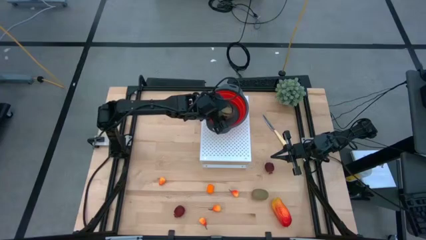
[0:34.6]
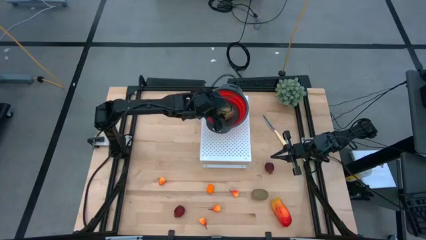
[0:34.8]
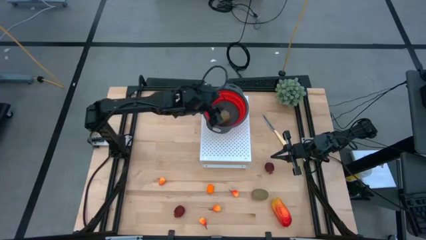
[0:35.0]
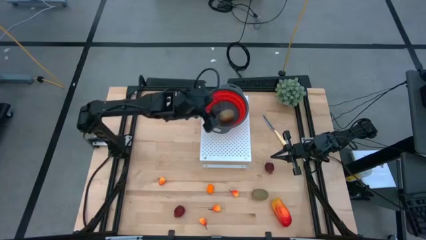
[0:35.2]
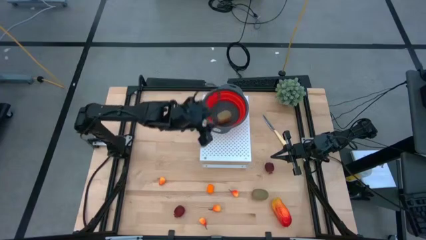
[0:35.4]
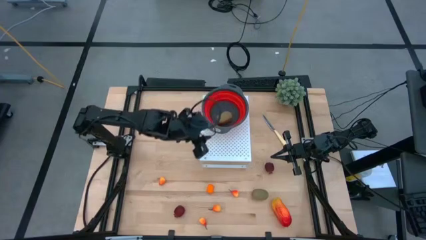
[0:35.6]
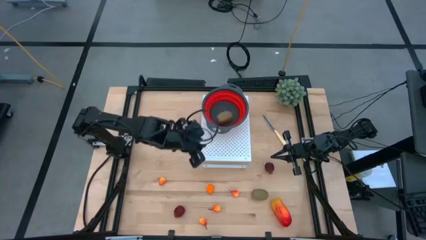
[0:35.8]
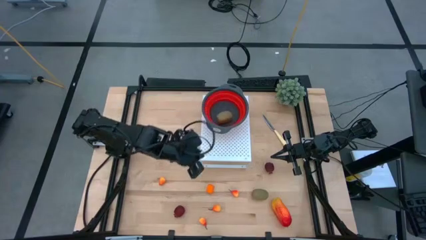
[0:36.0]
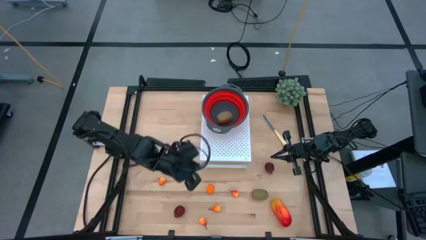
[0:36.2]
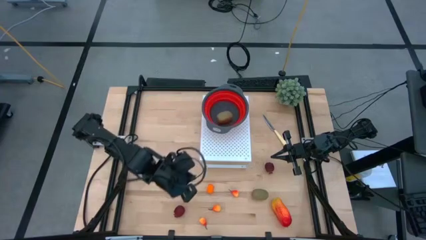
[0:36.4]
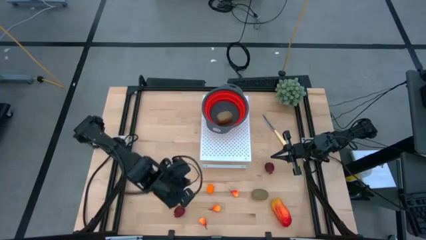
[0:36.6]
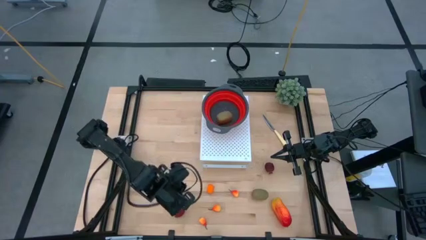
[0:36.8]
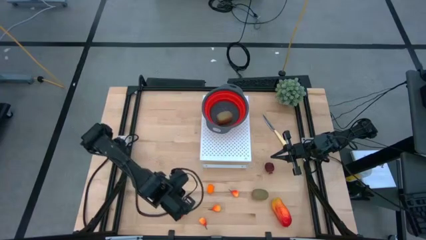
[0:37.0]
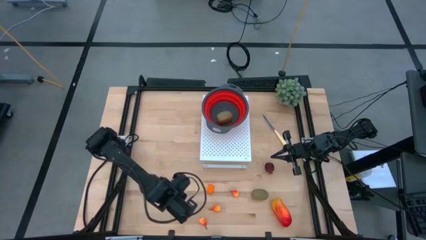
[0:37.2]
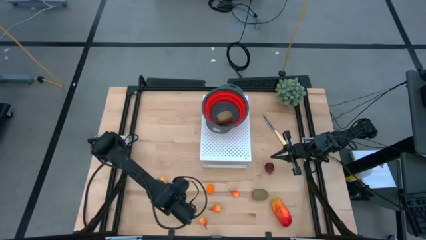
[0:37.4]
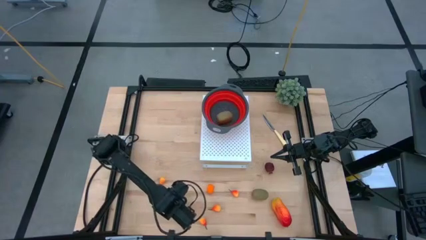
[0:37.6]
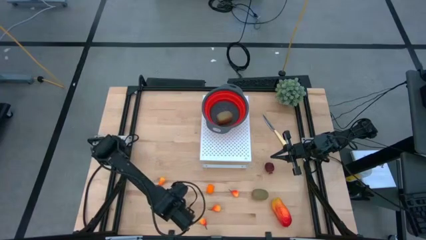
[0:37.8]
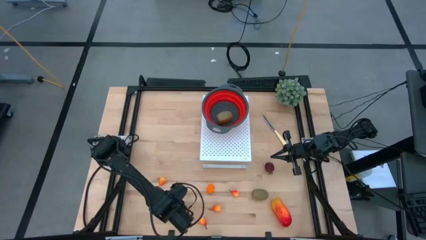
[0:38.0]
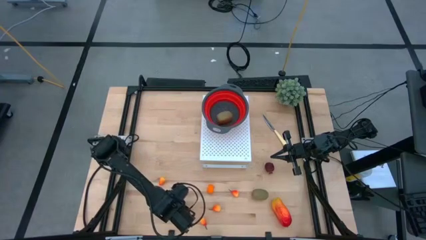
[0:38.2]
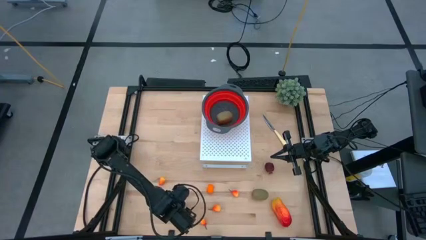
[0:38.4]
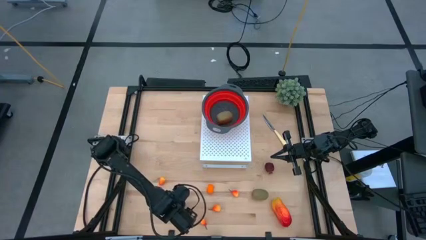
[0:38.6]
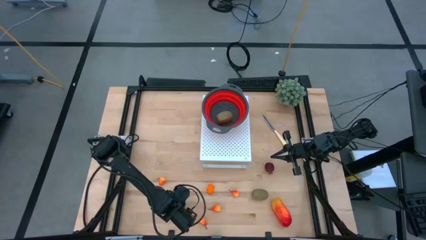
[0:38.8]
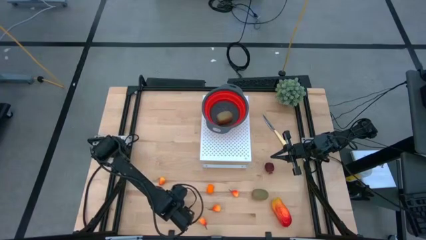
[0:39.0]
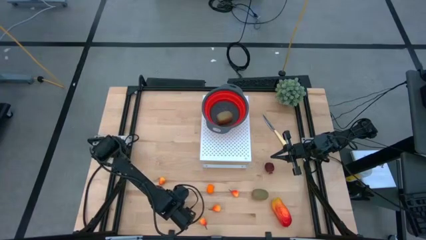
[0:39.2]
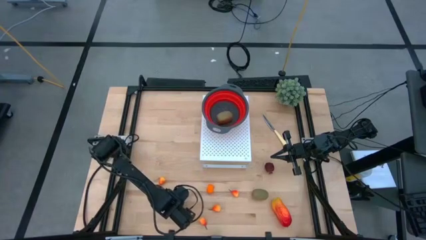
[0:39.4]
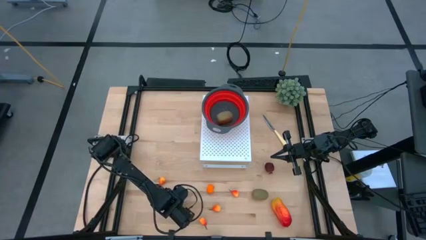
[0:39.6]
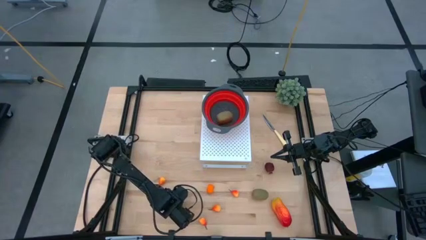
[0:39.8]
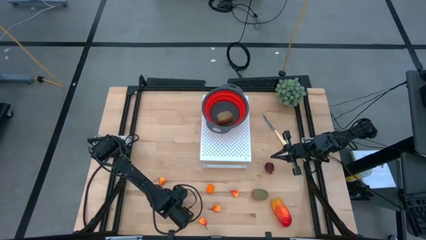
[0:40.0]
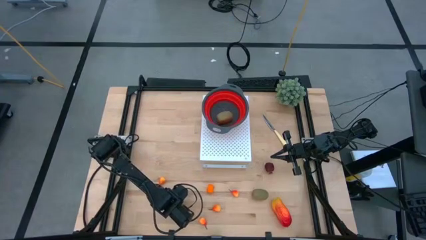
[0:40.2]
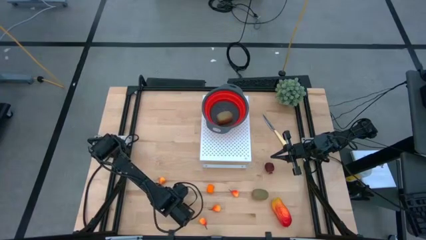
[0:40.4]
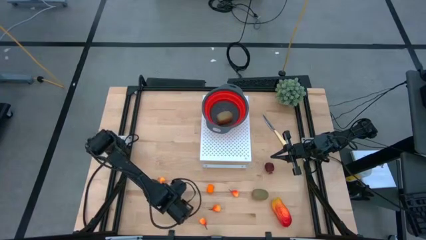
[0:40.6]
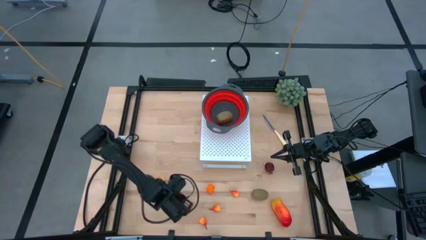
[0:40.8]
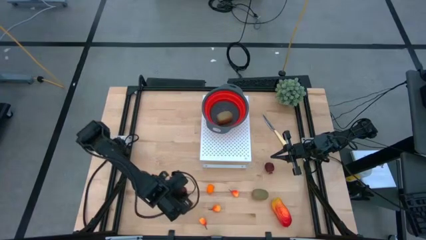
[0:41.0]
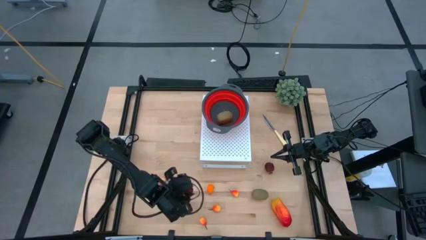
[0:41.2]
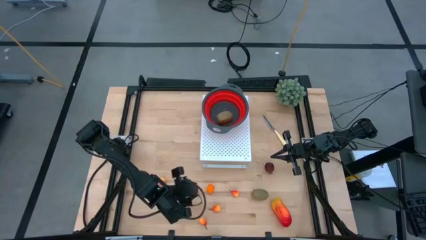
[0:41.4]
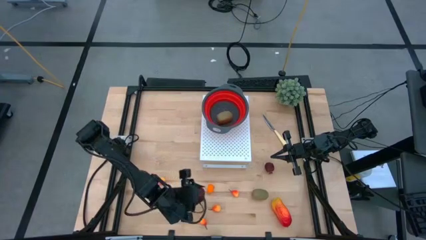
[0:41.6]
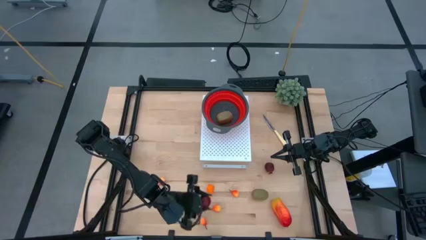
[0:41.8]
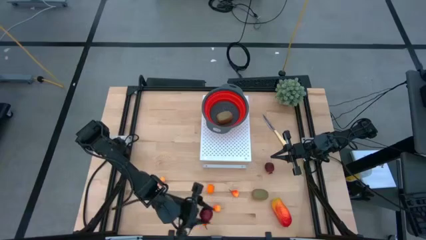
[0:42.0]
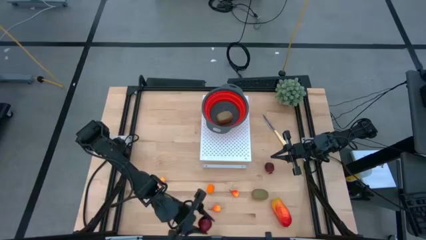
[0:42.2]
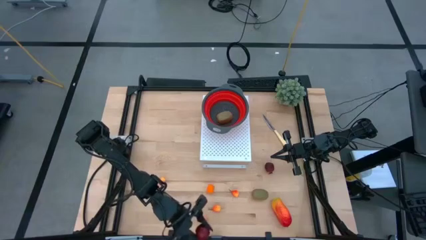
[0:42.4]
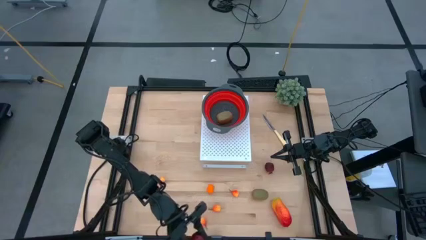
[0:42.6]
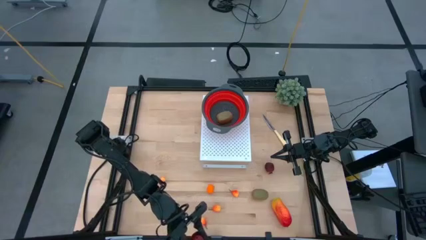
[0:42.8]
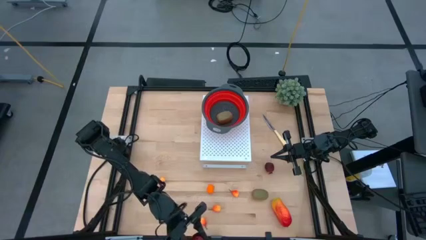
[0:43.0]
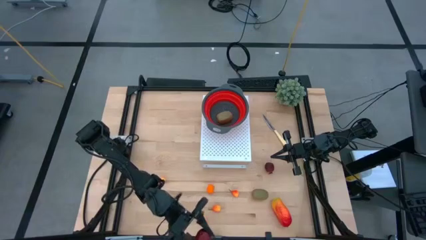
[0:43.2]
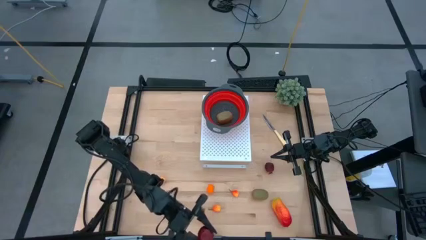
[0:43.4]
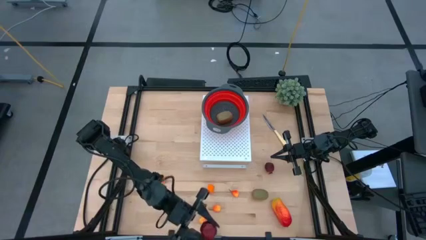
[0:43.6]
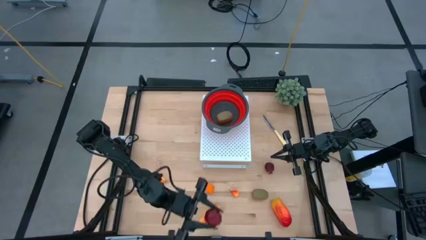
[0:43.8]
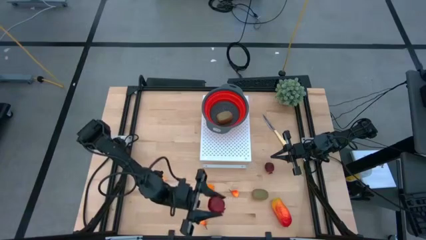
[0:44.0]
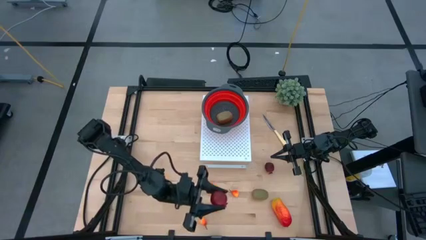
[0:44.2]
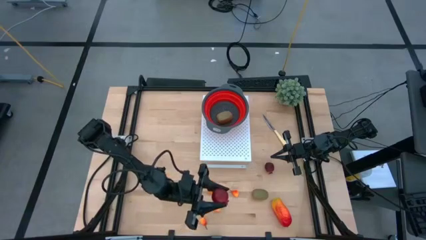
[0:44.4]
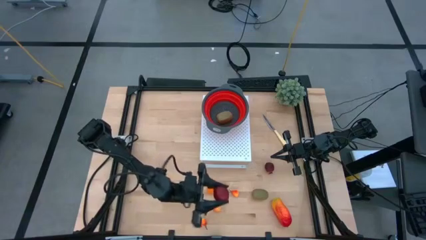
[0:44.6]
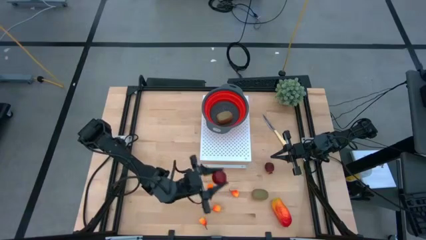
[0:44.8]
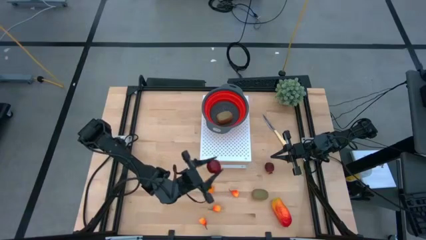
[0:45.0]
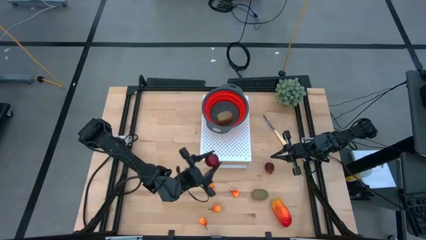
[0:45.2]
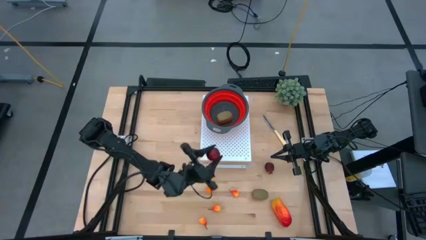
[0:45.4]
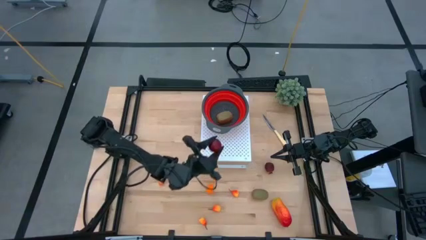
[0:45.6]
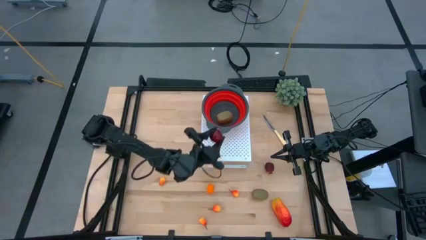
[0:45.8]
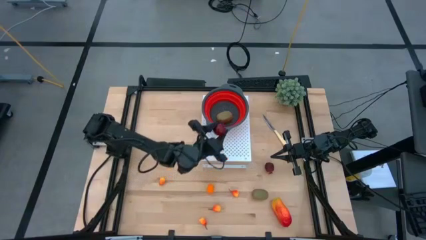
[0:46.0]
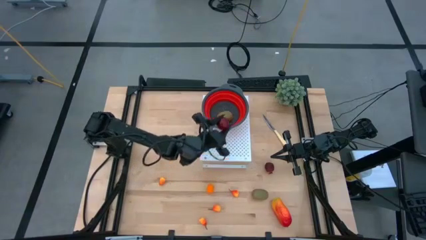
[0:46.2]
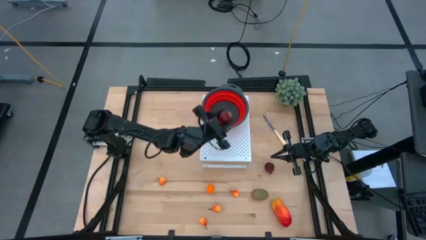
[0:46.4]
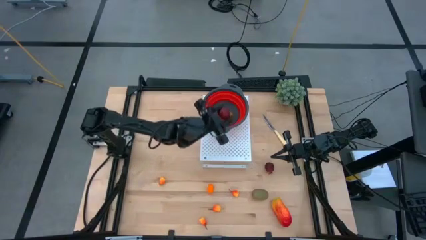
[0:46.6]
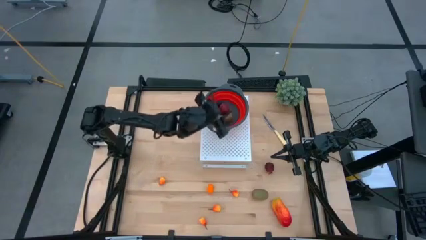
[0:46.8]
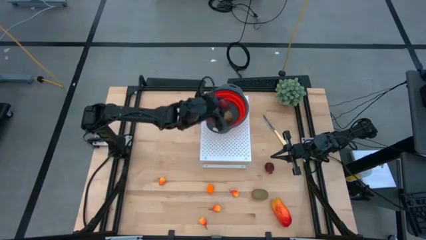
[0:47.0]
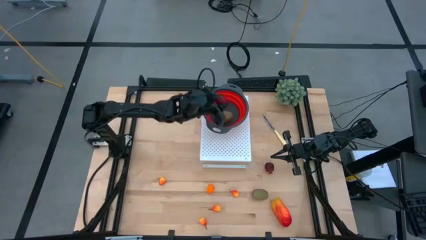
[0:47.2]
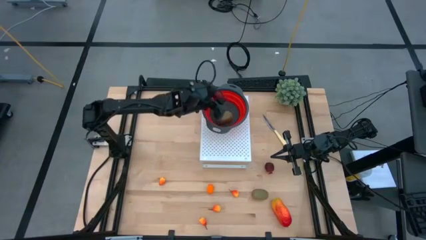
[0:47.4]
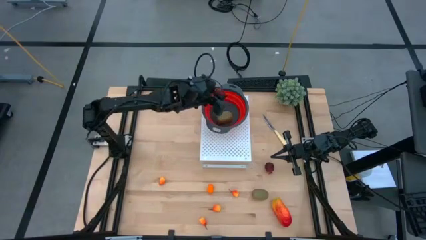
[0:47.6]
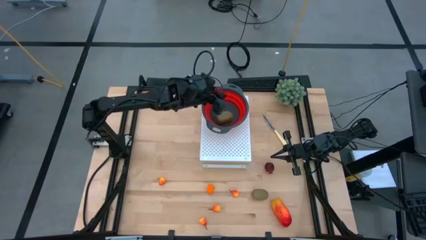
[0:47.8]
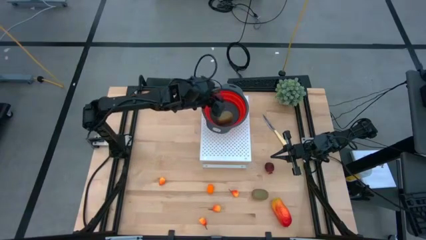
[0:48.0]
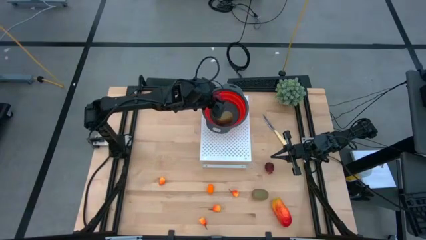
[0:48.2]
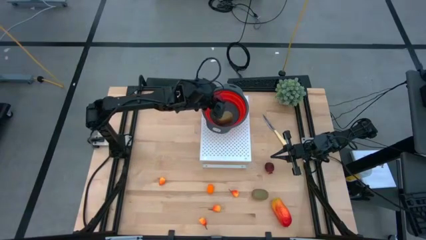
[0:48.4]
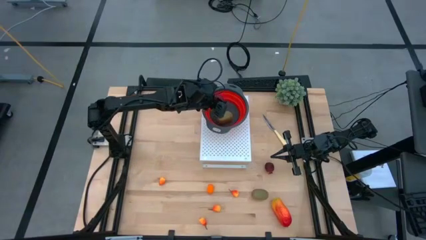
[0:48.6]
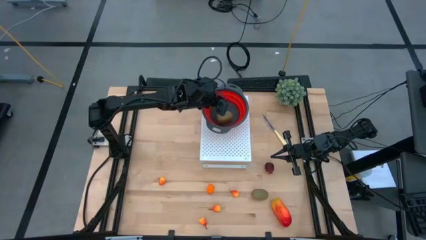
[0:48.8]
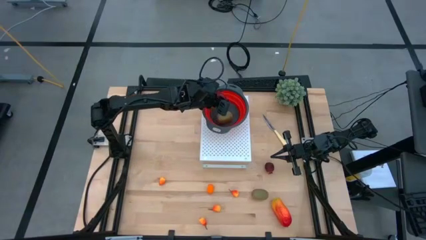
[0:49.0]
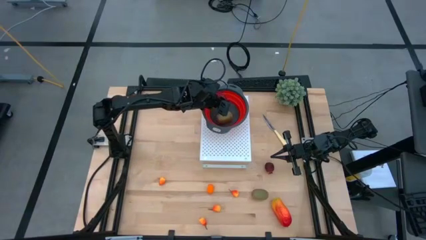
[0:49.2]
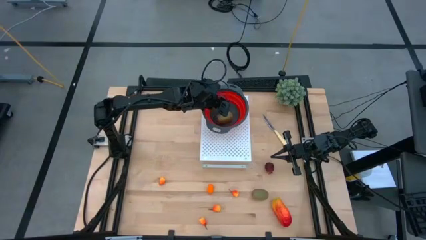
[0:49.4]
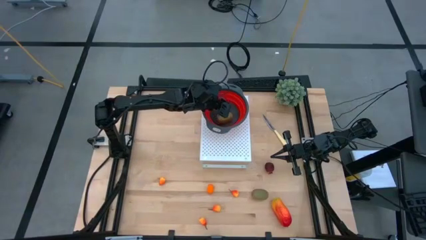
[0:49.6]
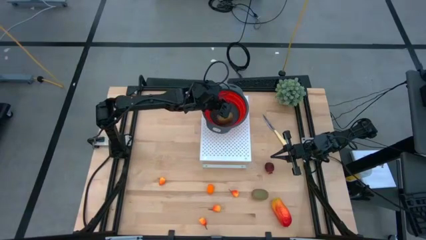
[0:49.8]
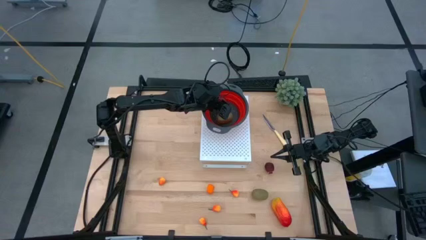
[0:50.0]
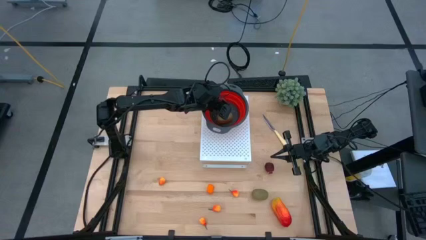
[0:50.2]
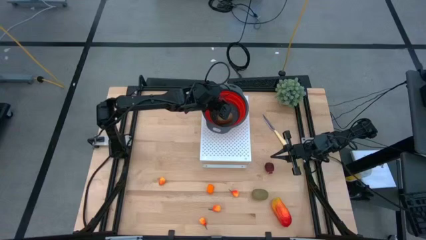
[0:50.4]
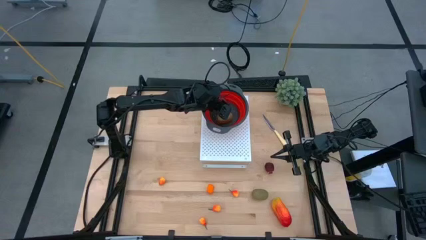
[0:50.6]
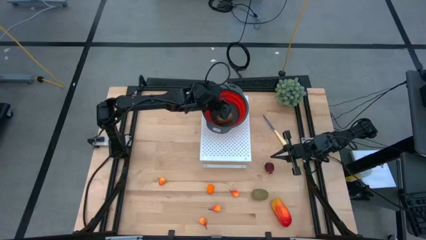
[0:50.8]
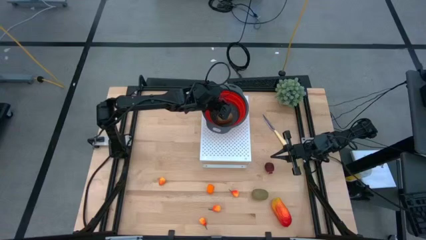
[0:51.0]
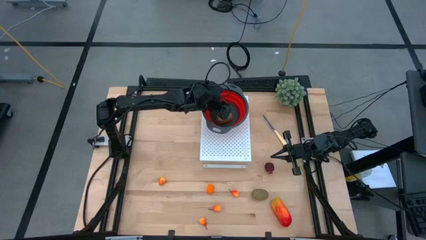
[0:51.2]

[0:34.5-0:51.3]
Task: Pick & Place Fruit
Put the red pomegranate into the red strainer bowl
